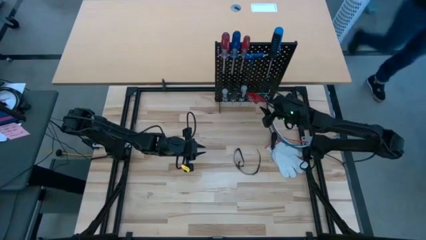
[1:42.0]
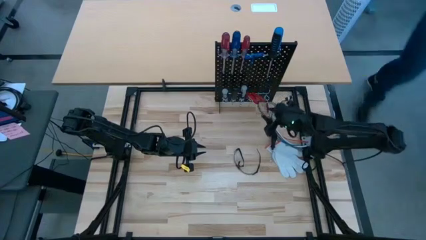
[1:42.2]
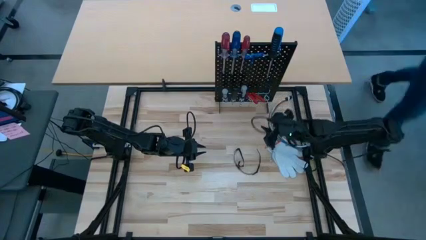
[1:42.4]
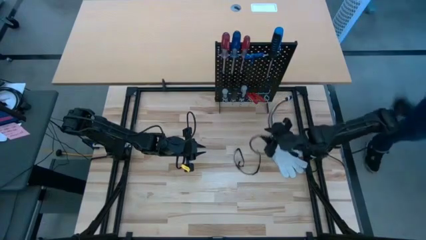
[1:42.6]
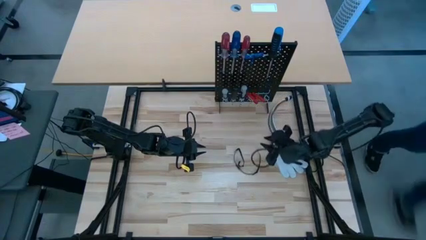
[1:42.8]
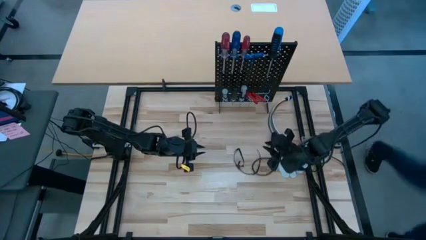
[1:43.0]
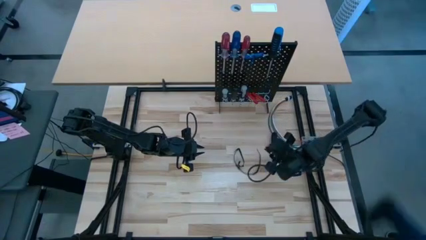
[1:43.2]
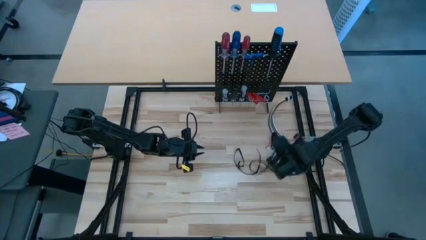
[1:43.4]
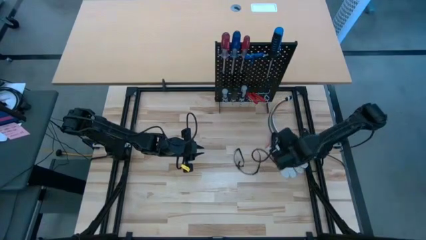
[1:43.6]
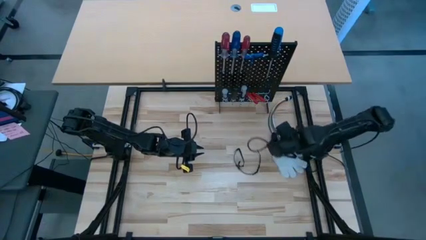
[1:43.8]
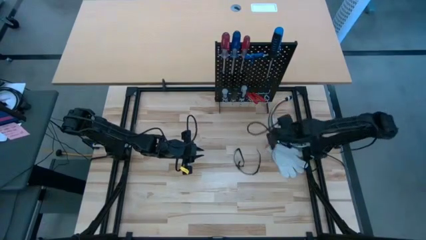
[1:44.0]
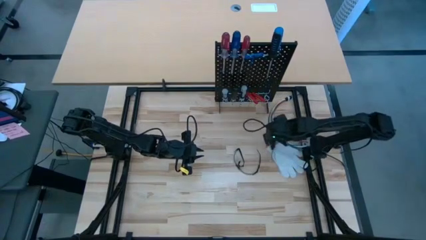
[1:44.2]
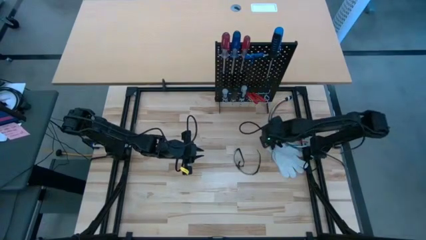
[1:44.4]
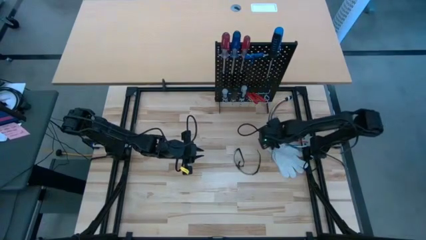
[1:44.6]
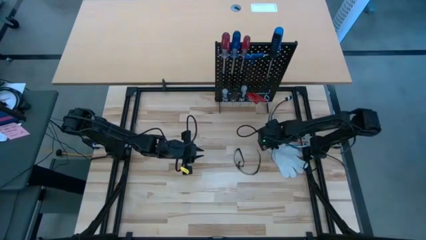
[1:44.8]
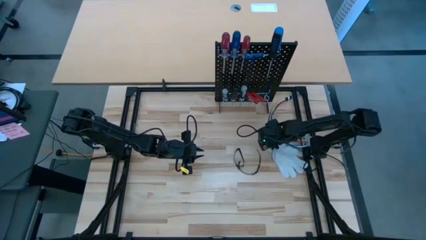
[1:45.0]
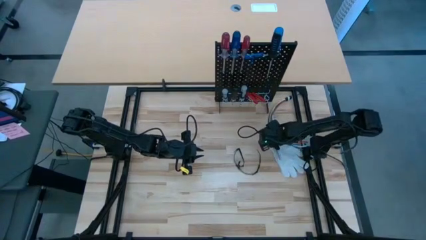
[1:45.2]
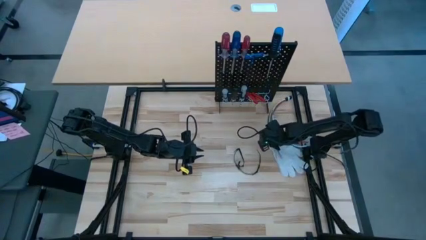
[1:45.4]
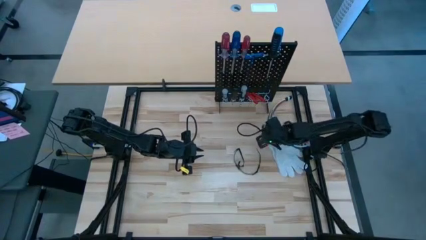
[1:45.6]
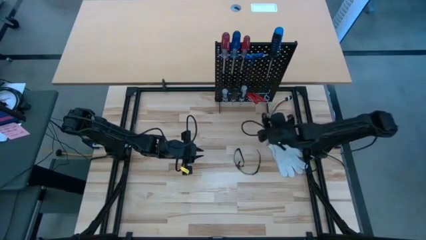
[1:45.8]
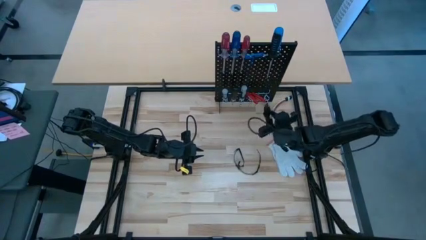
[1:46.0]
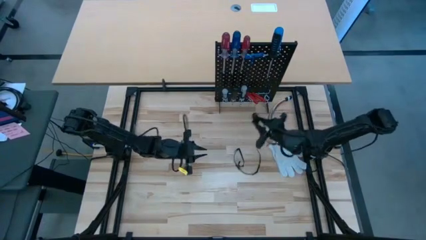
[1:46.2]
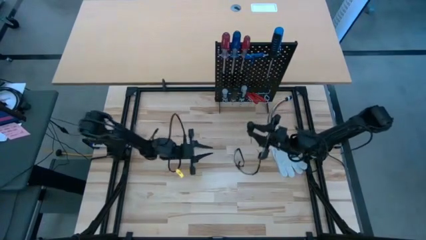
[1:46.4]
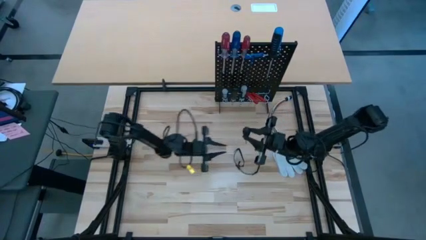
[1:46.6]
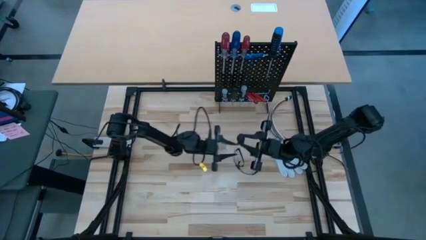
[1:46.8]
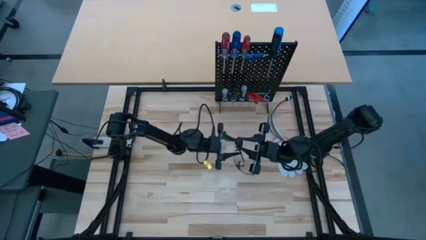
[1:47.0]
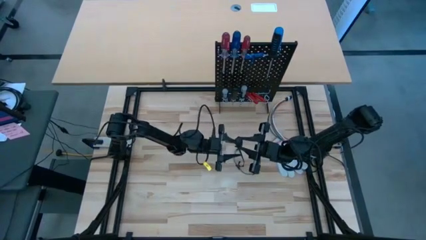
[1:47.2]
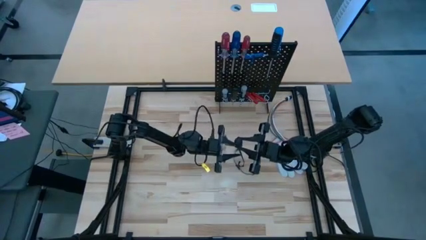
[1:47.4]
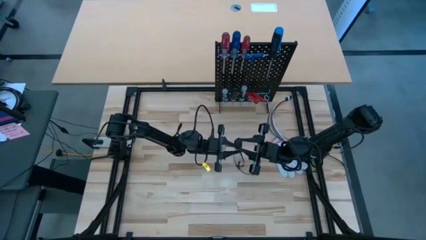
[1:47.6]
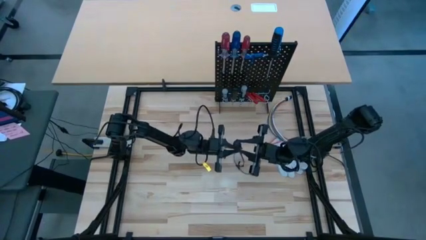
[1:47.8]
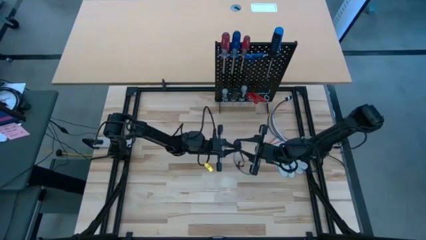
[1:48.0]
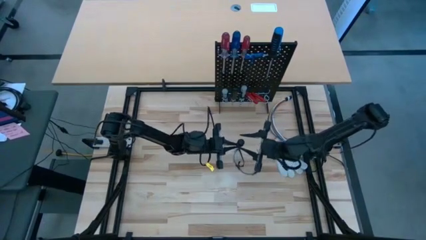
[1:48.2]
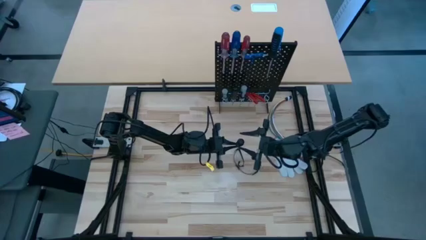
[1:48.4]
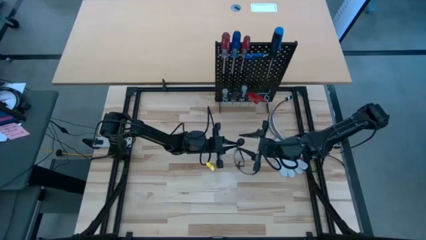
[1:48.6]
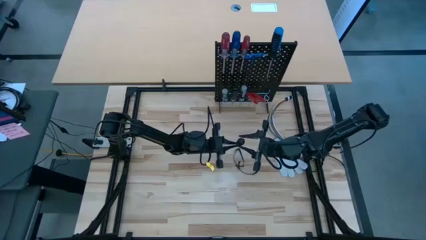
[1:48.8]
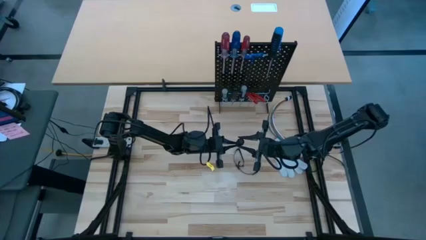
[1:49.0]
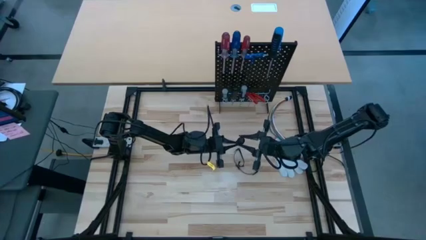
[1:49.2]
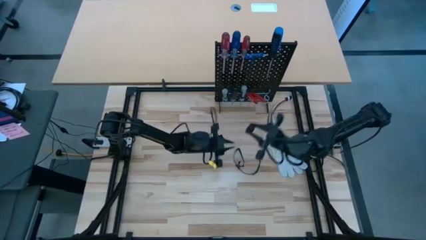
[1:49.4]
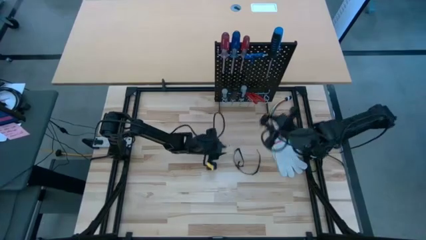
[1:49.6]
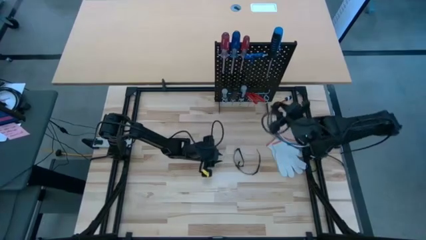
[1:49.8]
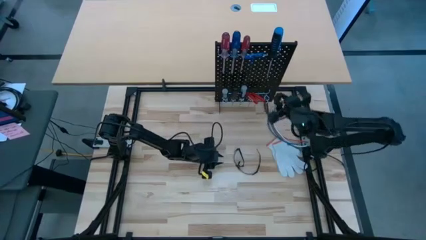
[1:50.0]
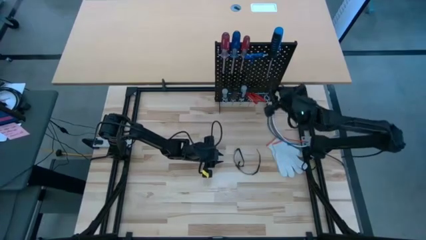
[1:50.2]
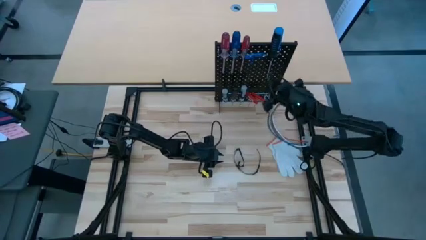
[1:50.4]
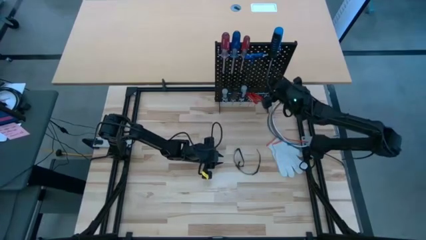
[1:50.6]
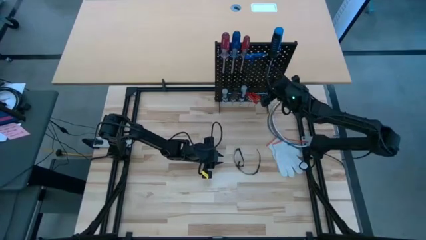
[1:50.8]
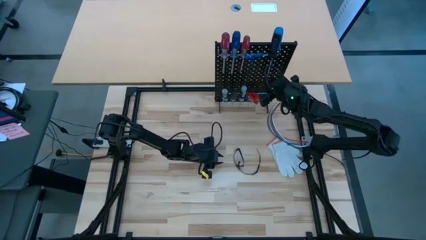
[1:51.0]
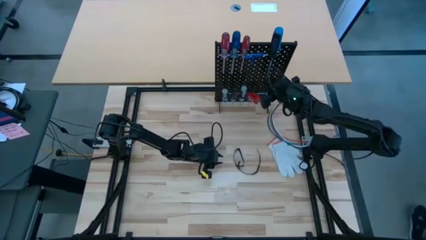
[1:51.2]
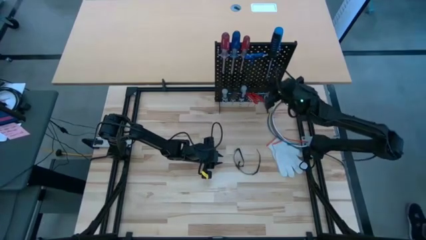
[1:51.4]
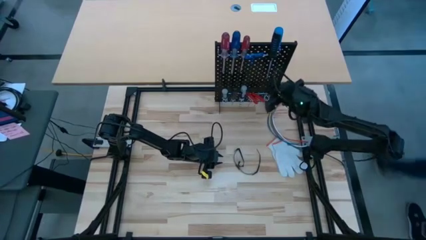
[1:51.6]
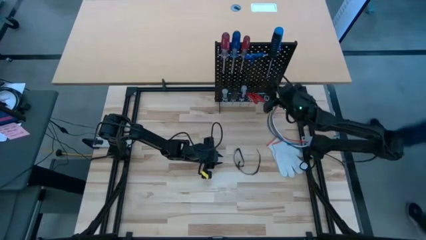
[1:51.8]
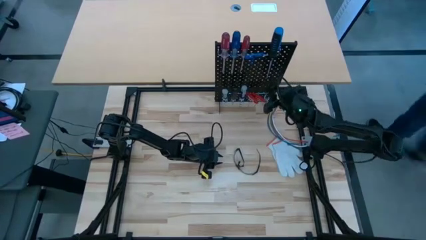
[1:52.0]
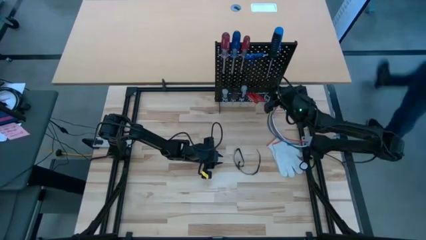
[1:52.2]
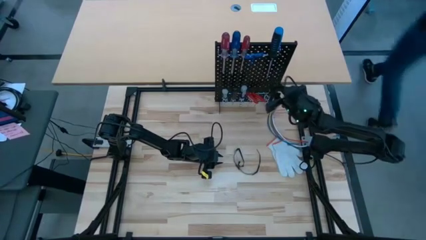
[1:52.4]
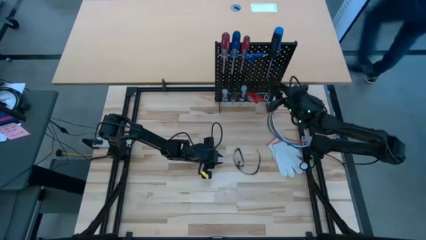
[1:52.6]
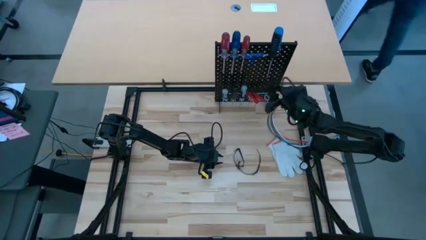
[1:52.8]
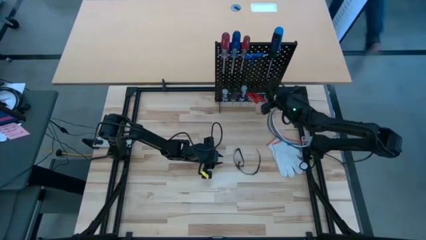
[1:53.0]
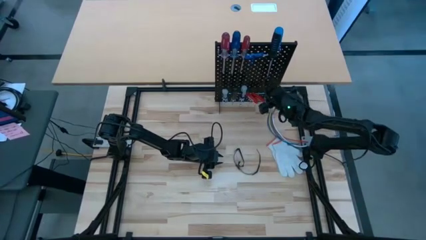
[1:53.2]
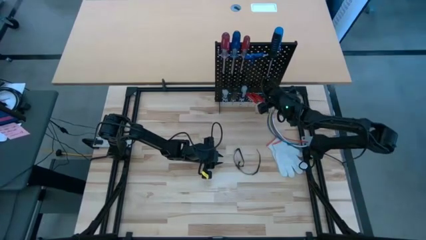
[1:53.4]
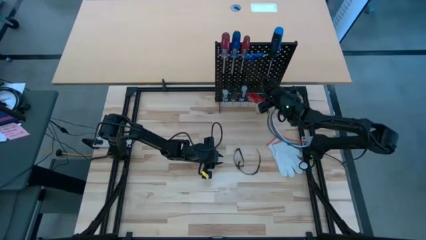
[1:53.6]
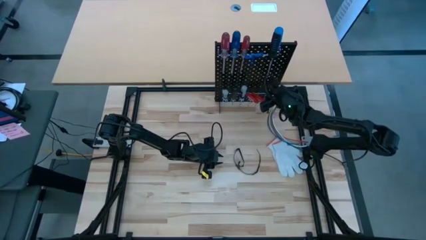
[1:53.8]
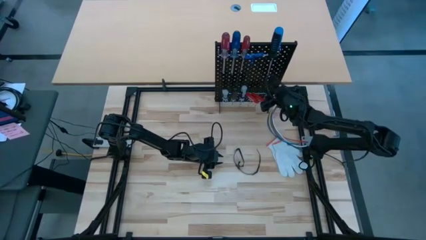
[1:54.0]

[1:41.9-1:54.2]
Task: Hang tools onto peg board
Hang the black nut driver on the pegboard

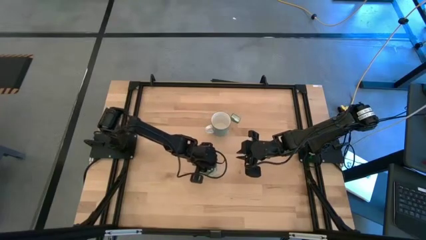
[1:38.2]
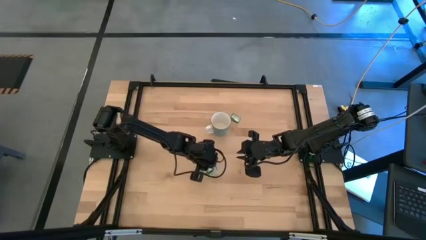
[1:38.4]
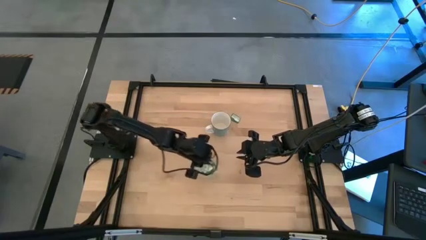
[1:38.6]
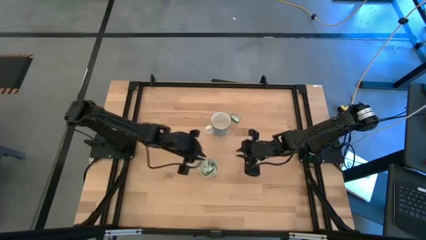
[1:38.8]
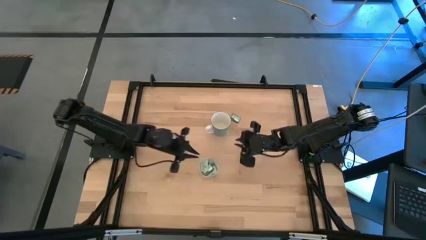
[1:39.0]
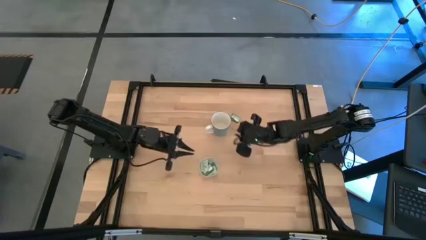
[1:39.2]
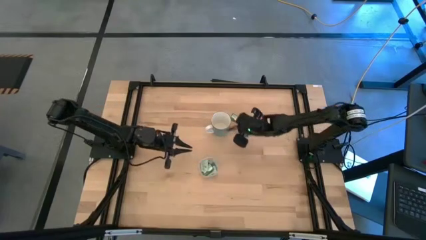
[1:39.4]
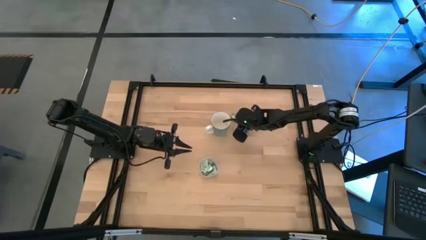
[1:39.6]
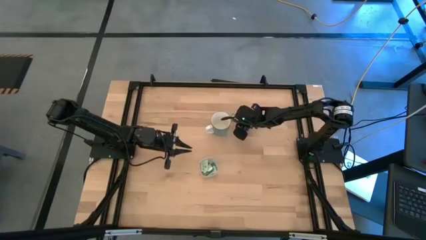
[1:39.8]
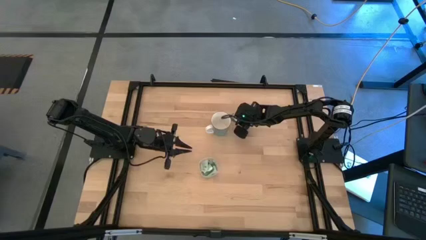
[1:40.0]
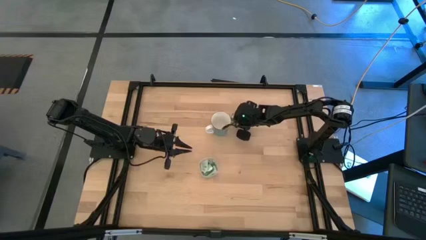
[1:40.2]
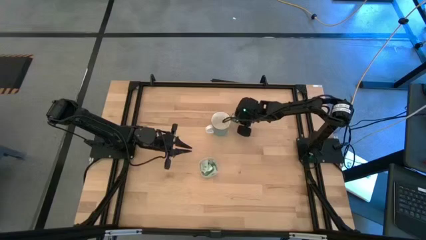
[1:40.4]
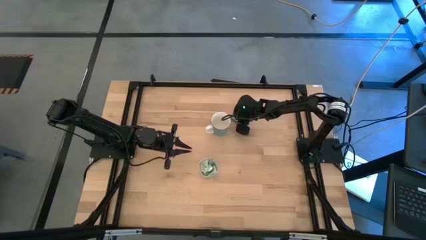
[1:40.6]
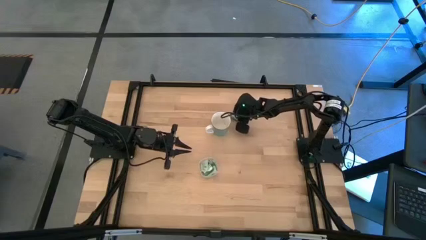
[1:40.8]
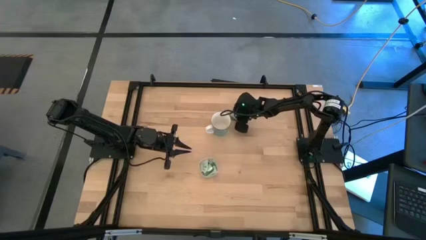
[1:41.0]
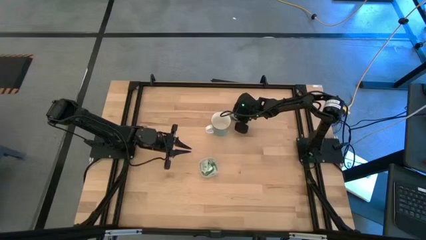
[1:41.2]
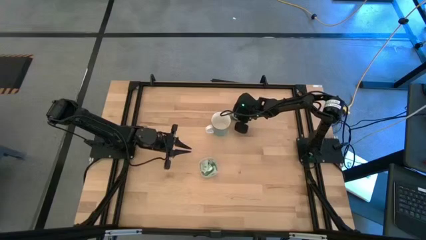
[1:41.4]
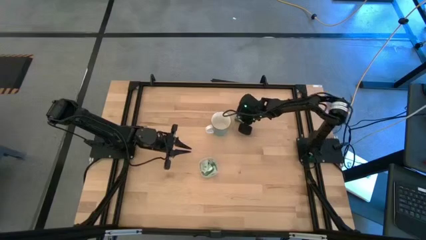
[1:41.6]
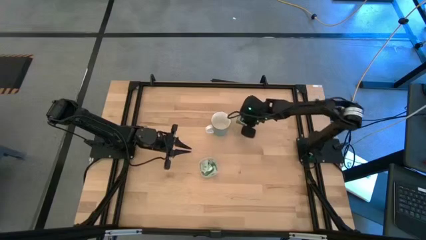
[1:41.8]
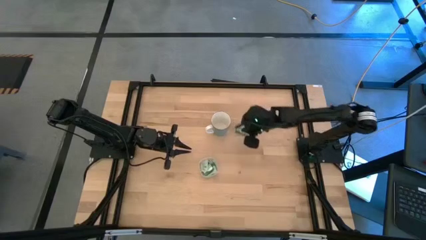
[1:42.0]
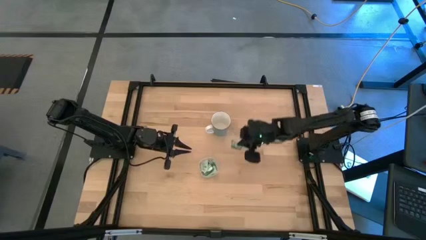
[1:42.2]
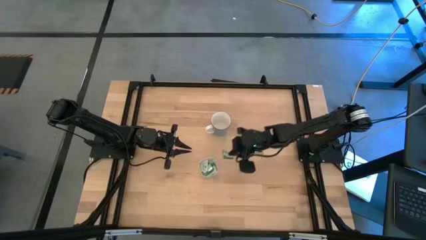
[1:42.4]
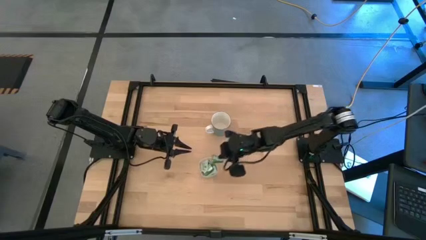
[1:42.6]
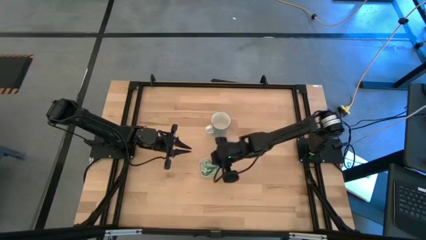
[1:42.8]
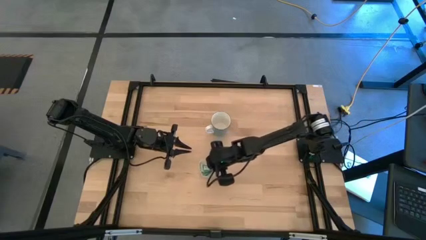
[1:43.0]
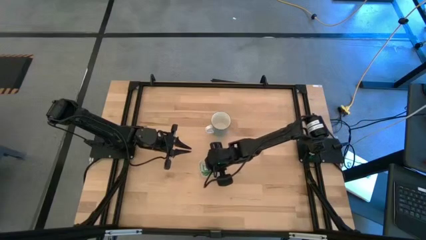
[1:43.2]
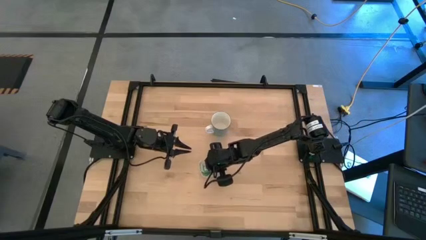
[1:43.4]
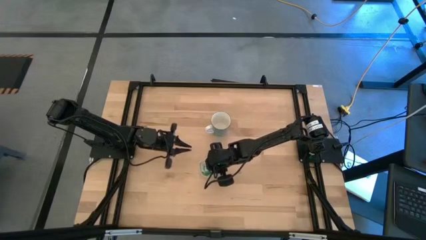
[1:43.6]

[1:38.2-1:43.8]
Task: Pick and place Stevia / Truvia into bins
Put the green stevia packet into the transparent bin
